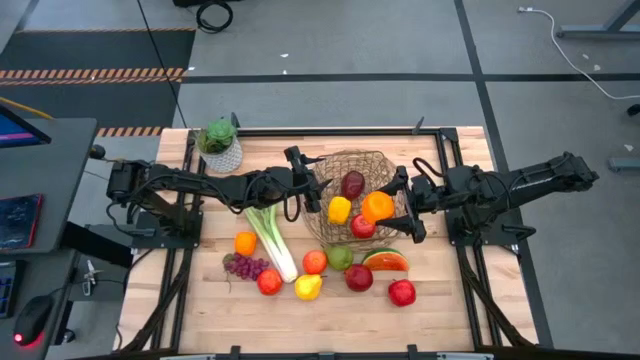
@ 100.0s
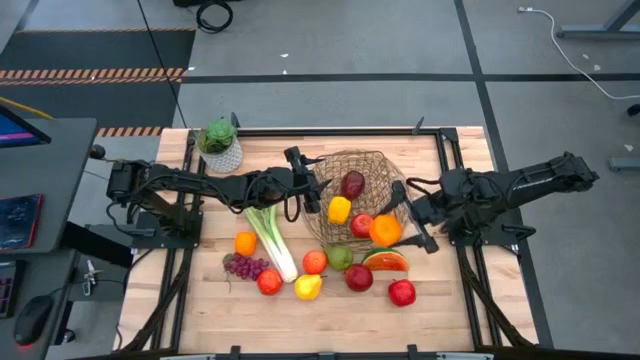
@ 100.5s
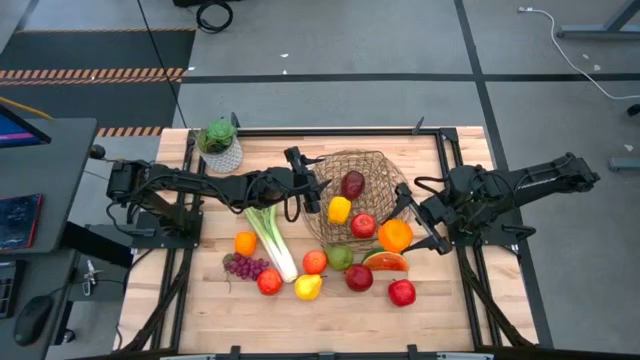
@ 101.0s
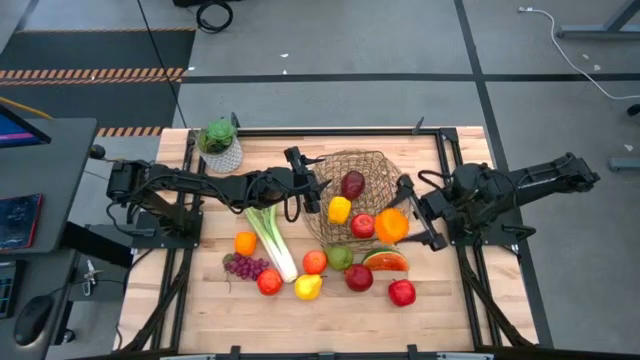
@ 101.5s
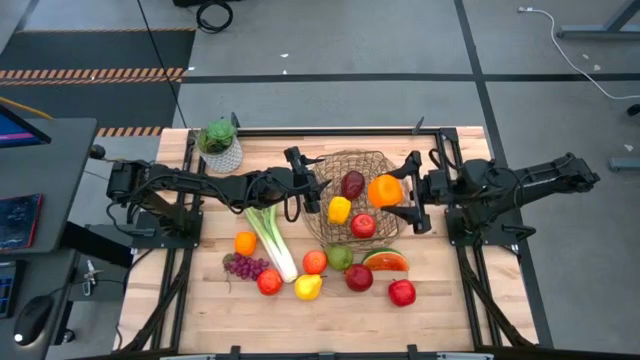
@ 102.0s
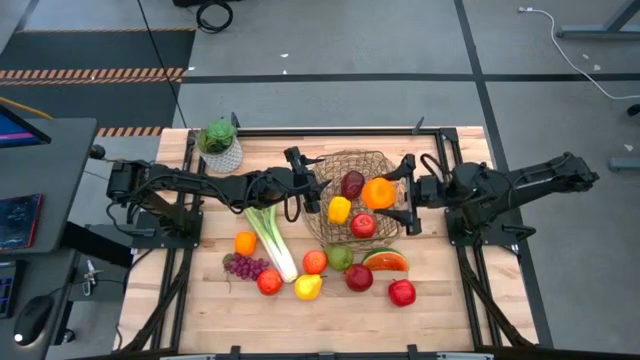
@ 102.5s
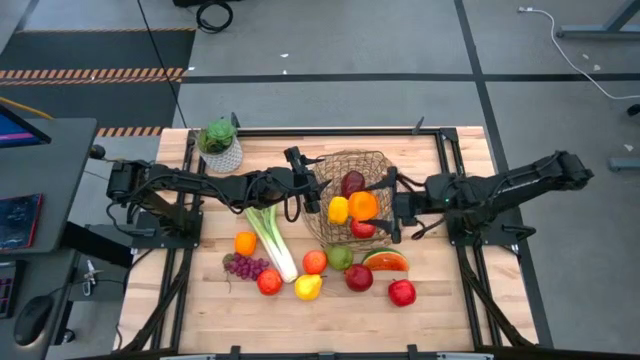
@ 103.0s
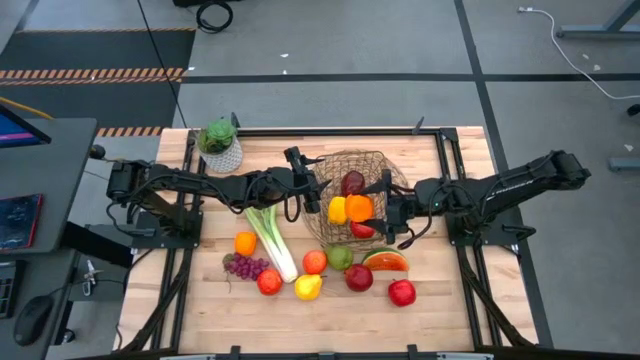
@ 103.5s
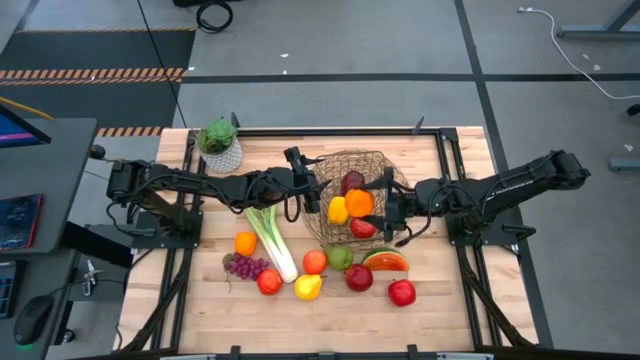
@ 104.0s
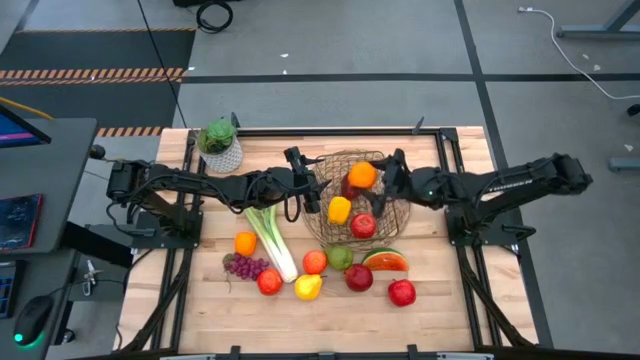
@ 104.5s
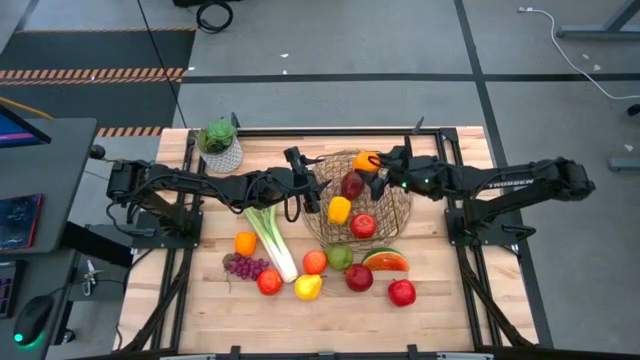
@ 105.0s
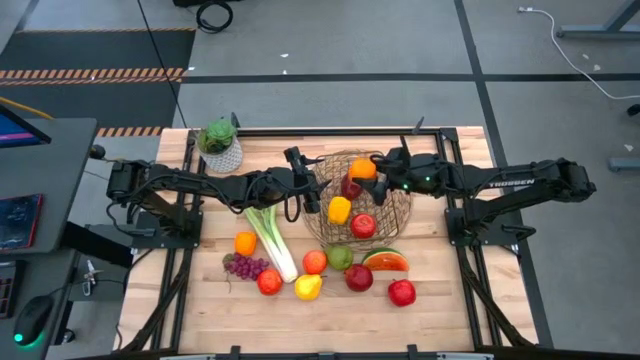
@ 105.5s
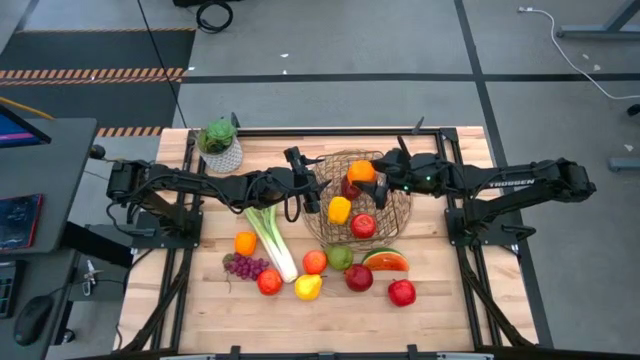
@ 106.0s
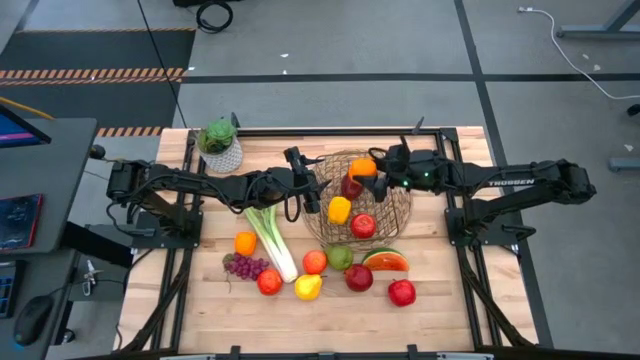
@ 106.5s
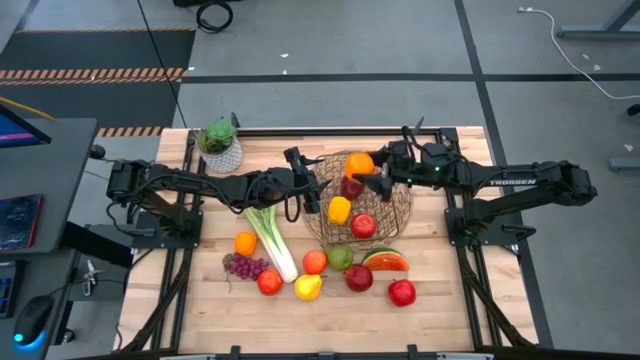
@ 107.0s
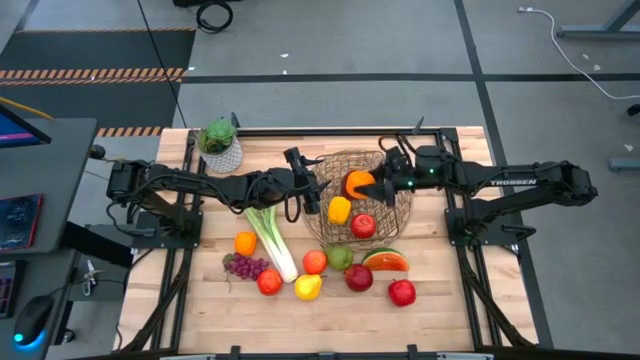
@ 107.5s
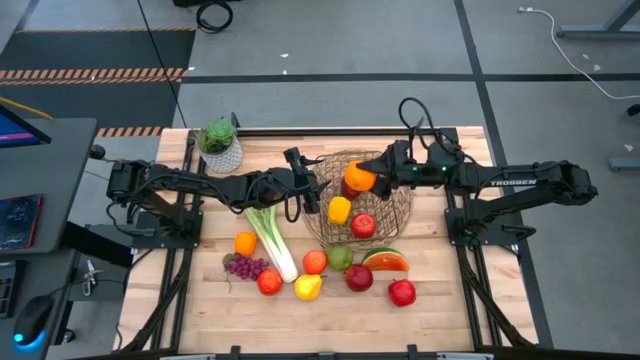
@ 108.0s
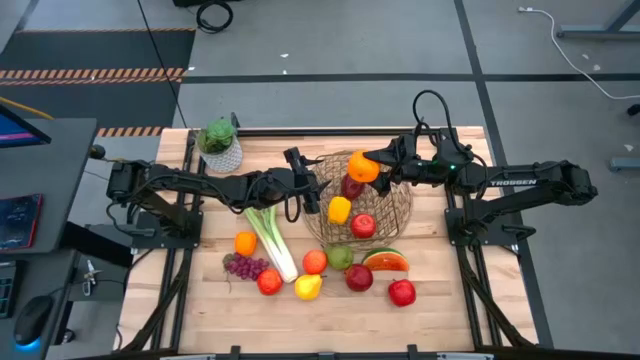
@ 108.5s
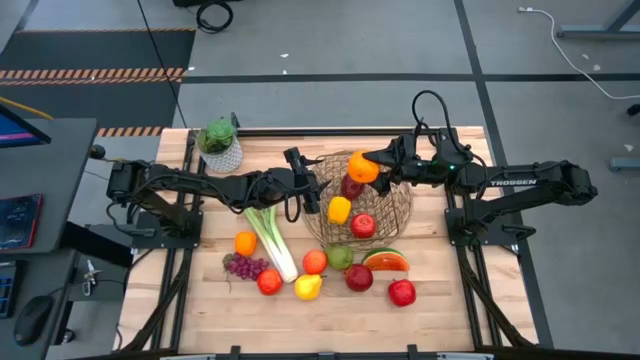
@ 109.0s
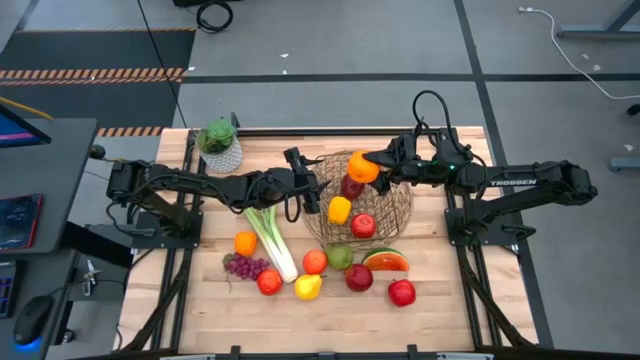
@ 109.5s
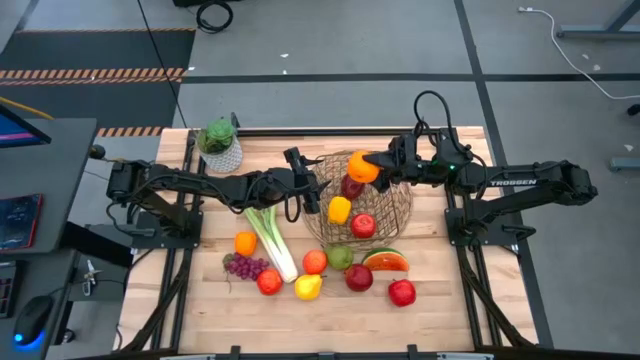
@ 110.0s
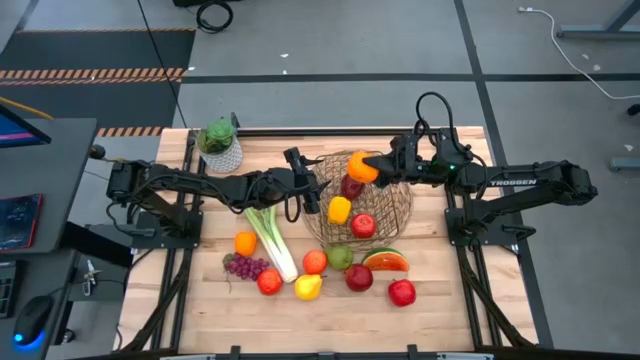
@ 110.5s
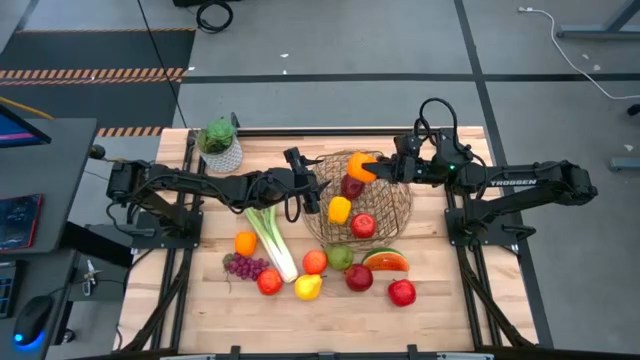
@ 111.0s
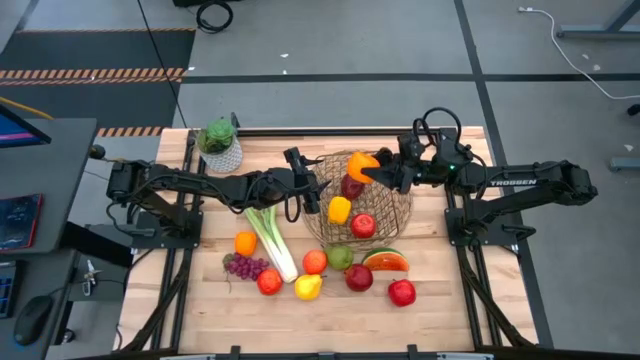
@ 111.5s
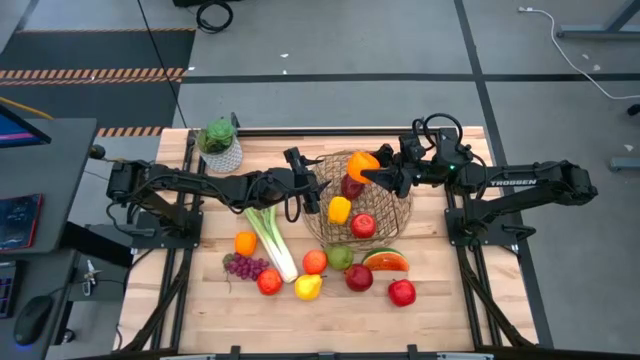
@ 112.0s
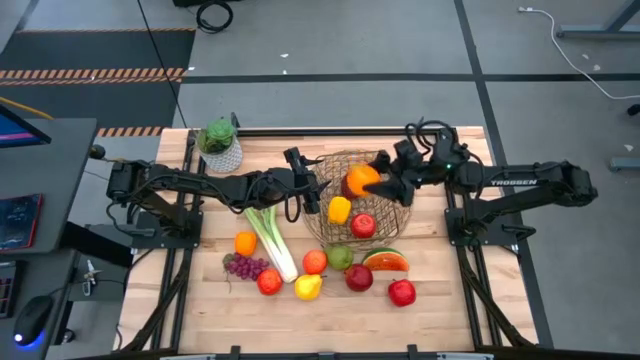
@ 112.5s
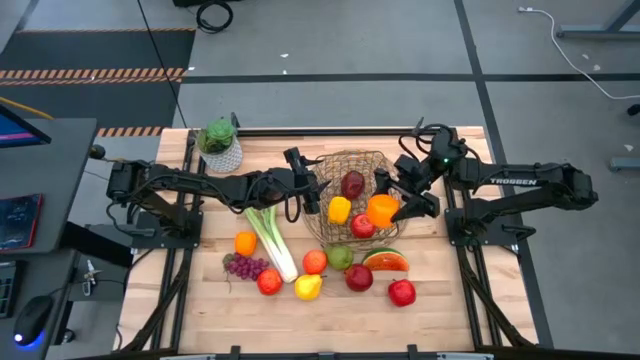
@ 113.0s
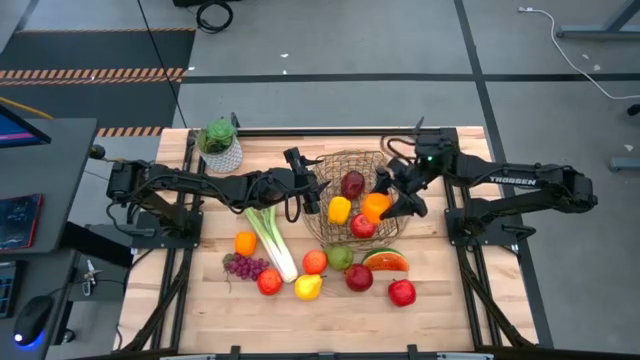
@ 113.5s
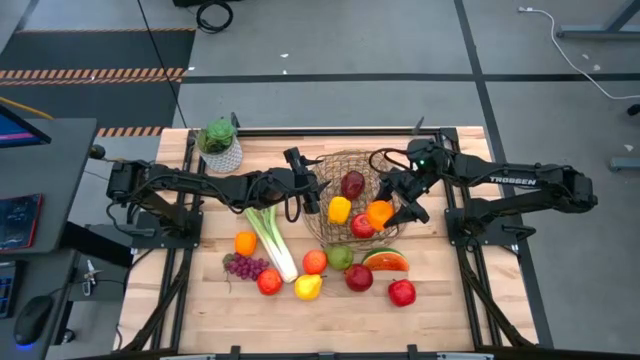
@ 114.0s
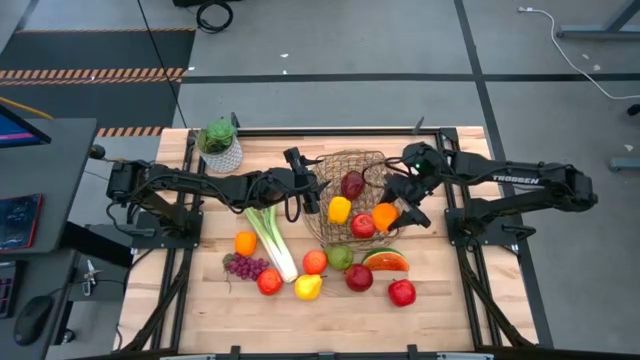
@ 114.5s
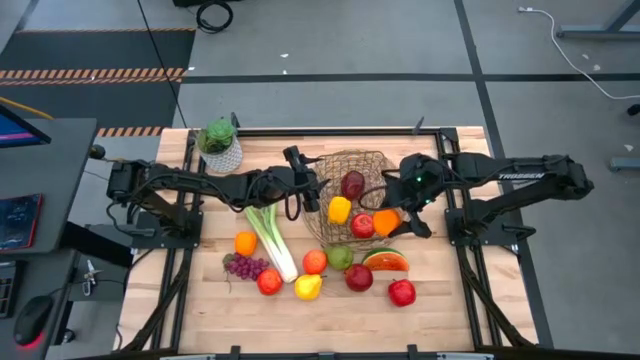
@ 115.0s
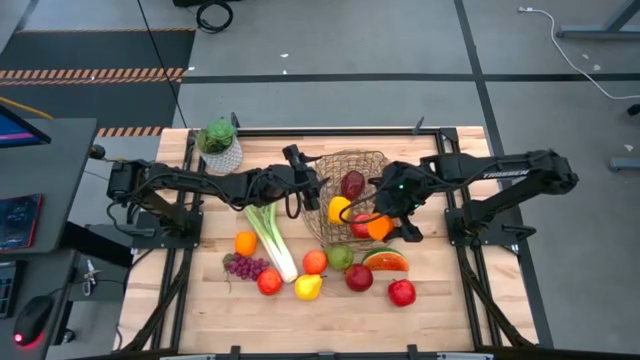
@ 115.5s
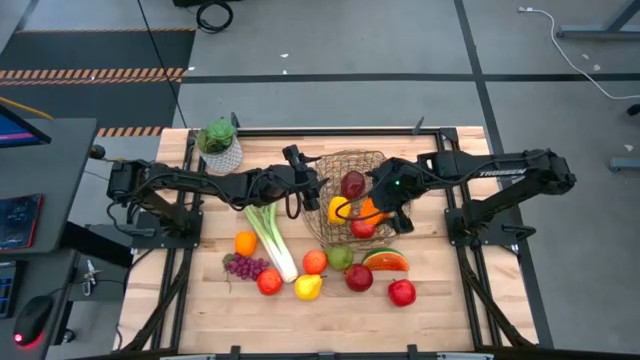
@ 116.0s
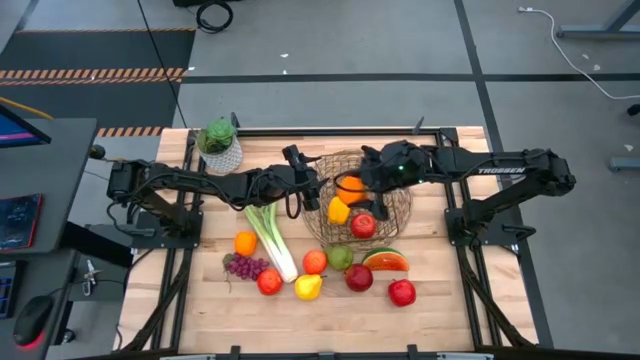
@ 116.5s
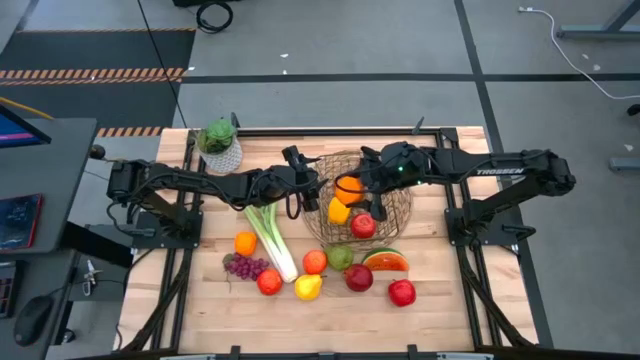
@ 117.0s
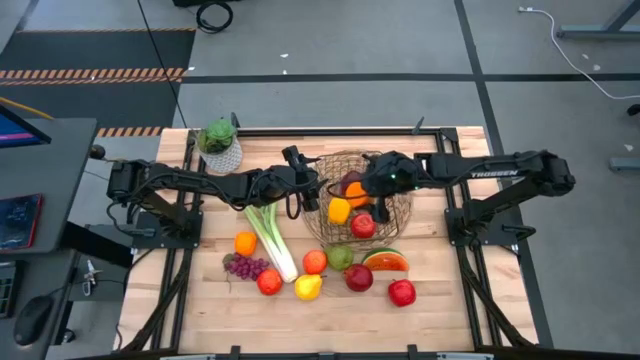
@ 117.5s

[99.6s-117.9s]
Task: Build produce basket
Put the orange into the brown wire basket
